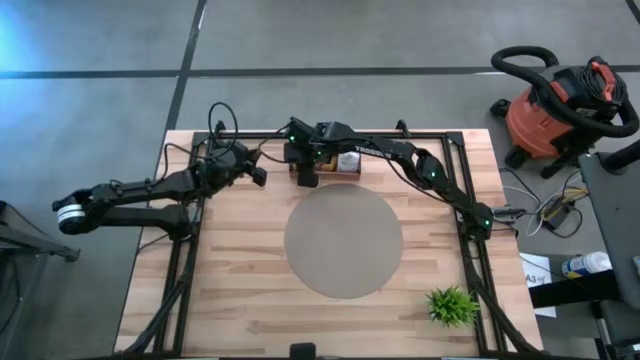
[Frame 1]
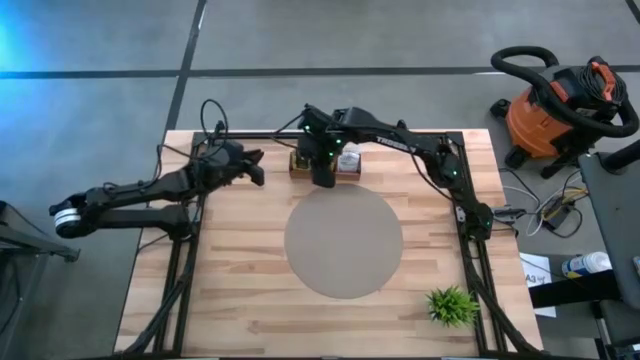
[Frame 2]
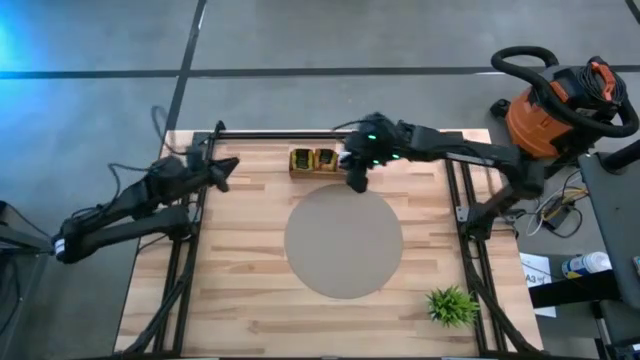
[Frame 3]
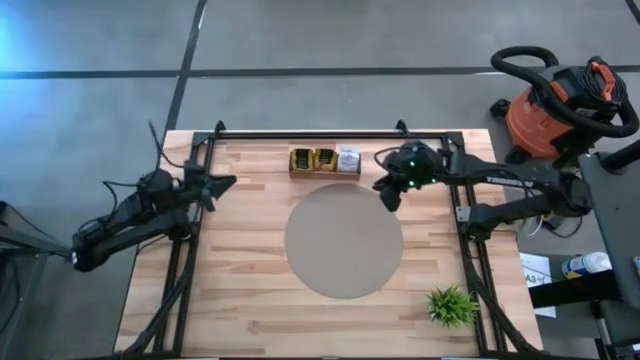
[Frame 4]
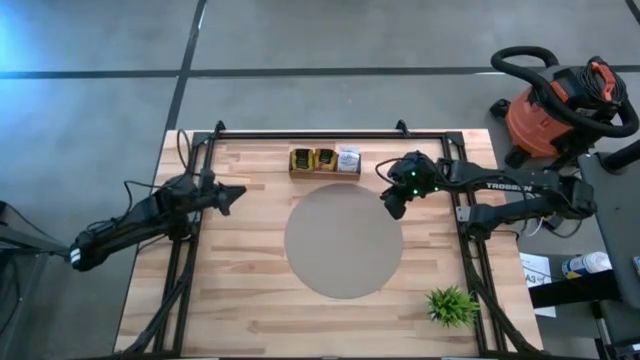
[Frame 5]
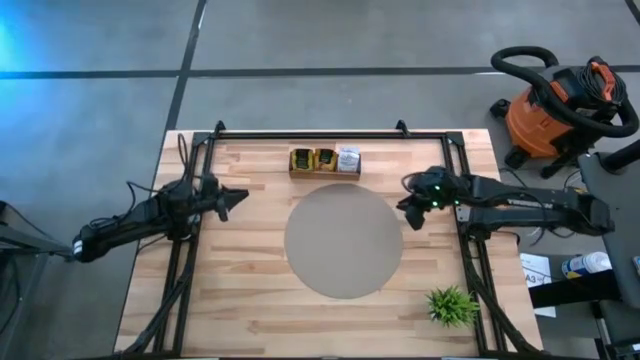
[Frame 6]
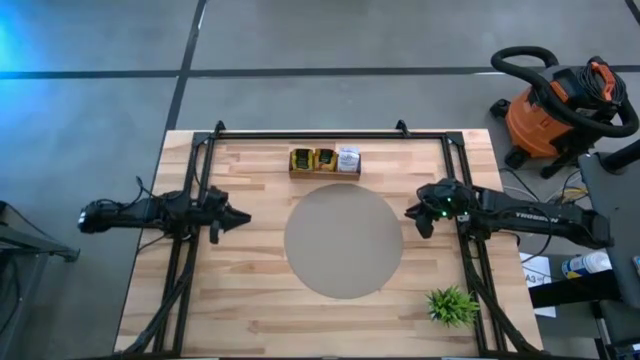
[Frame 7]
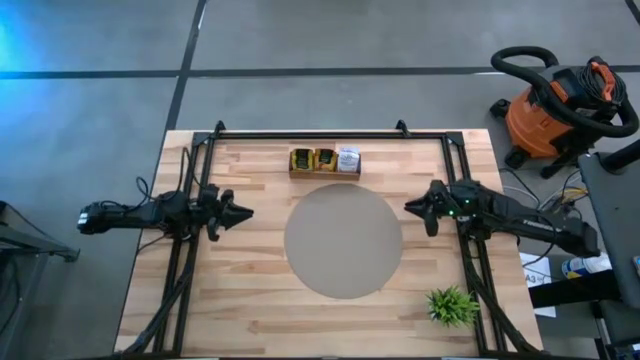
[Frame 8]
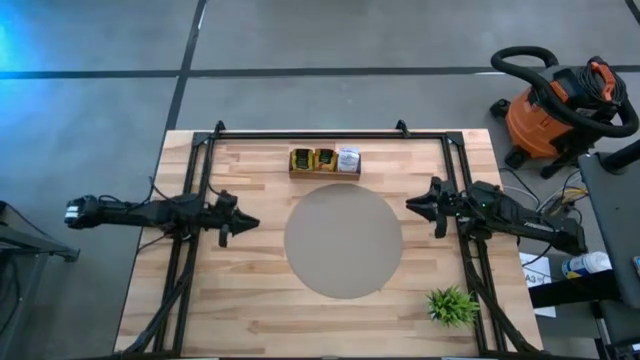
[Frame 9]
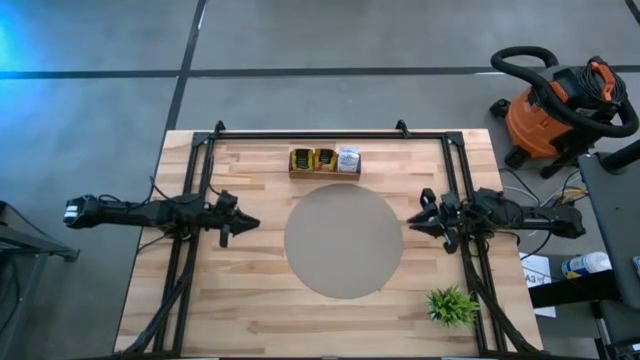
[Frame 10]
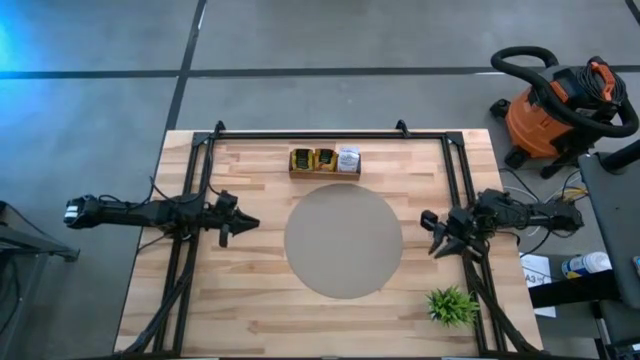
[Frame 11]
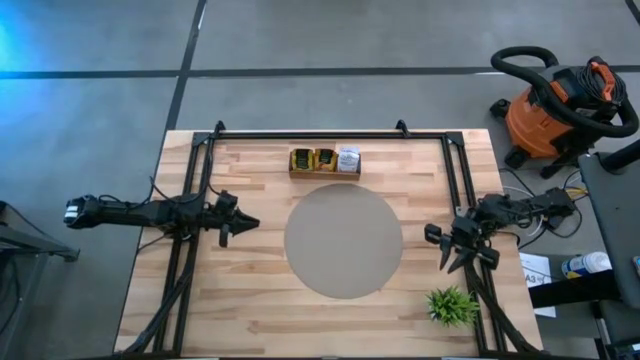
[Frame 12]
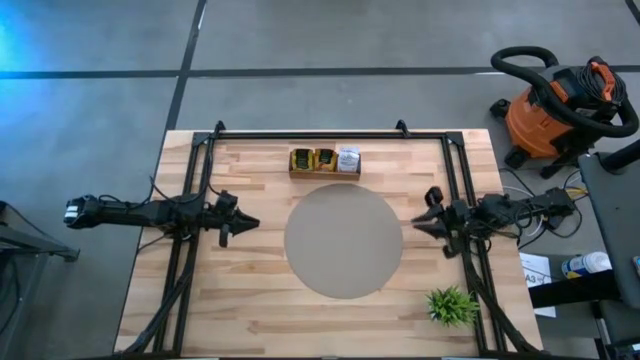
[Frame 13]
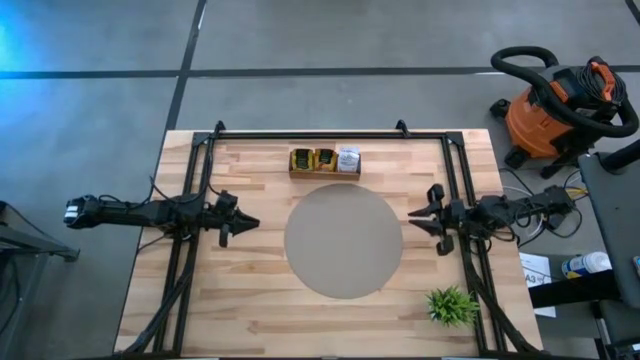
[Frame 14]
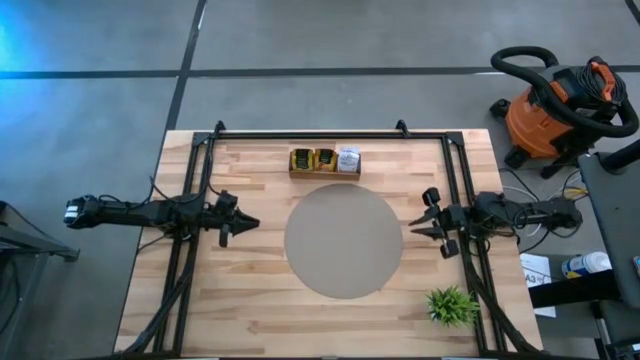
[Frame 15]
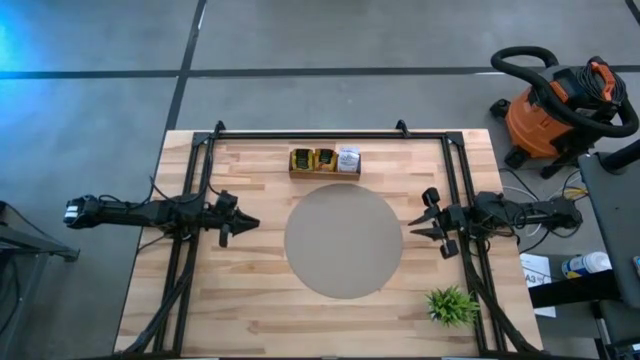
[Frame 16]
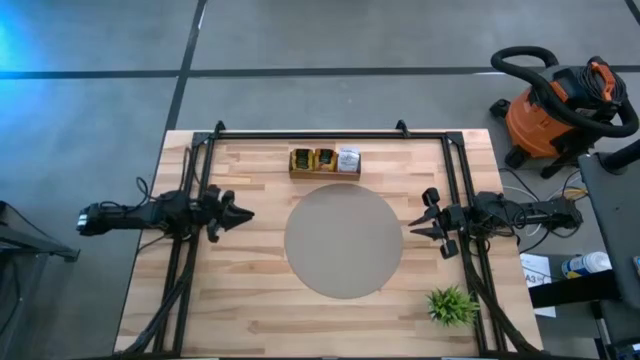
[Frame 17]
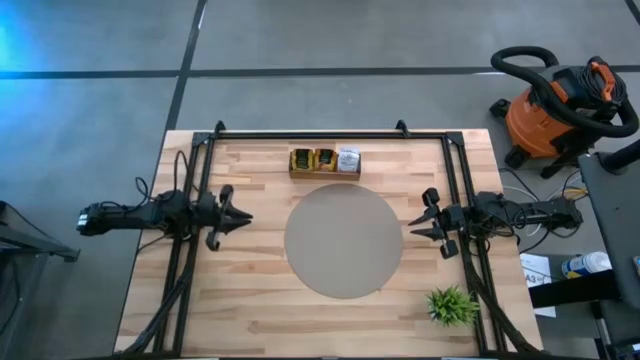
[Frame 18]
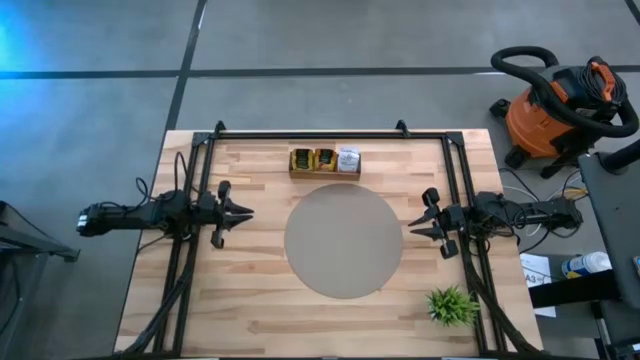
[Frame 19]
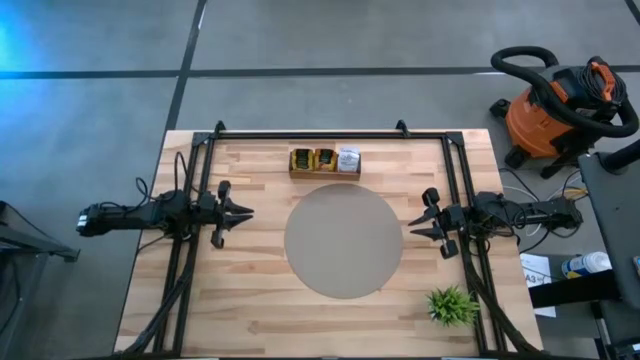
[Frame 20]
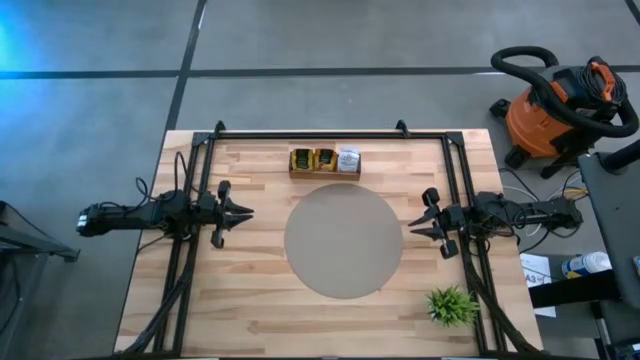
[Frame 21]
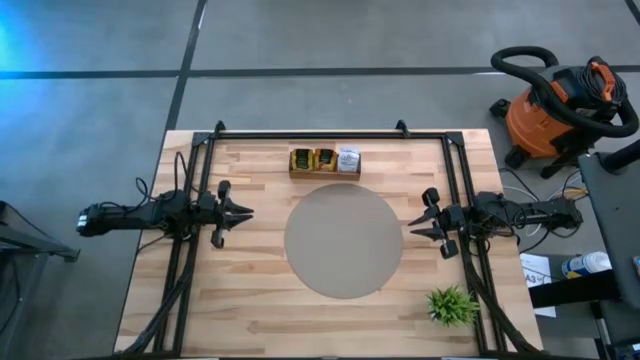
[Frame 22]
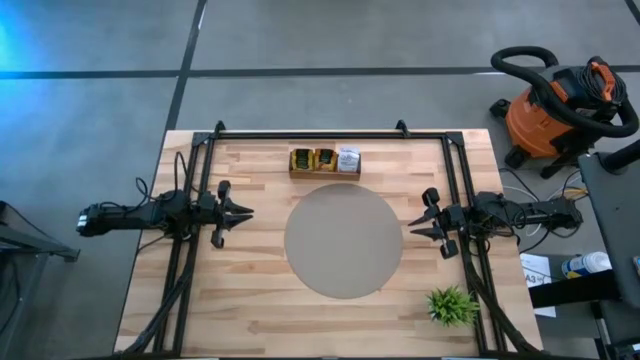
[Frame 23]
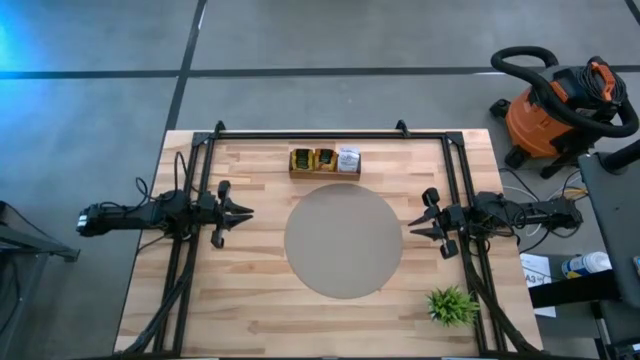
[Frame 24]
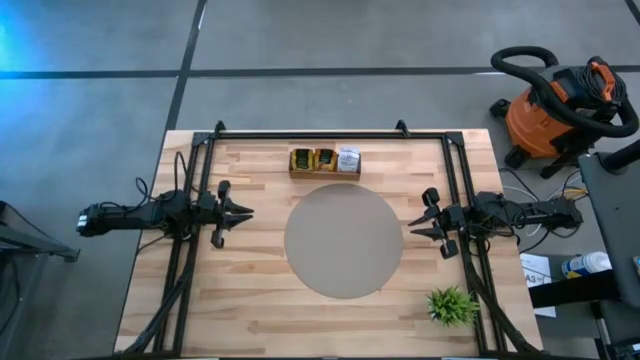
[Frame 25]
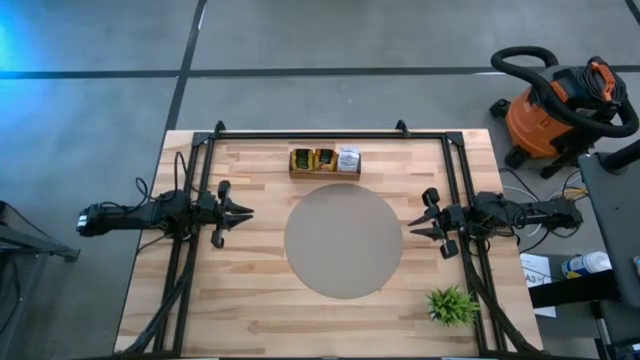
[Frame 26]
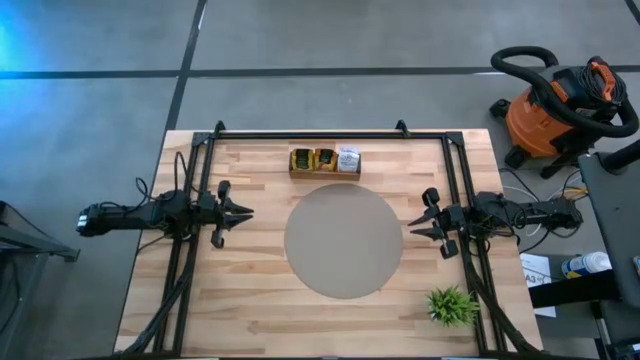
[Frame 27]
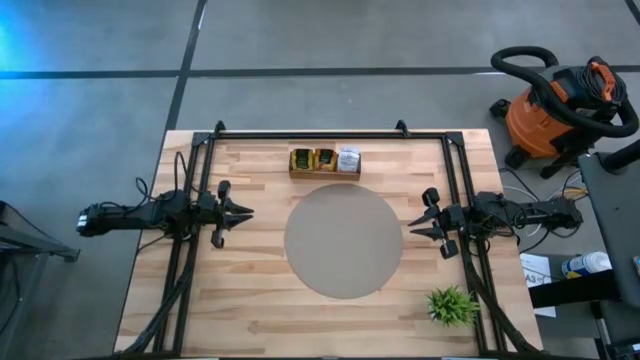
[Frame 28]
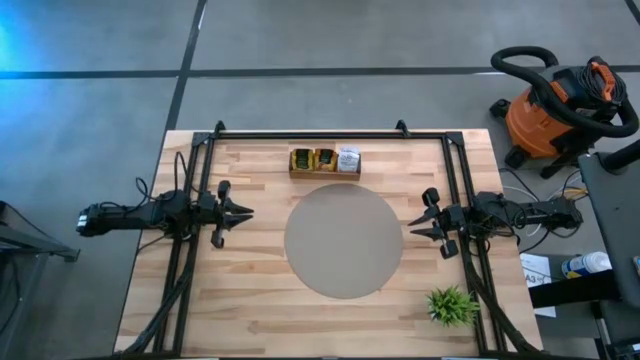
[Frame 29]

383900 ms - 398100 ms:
Task: Pick & Place Tea
Return to Home Position

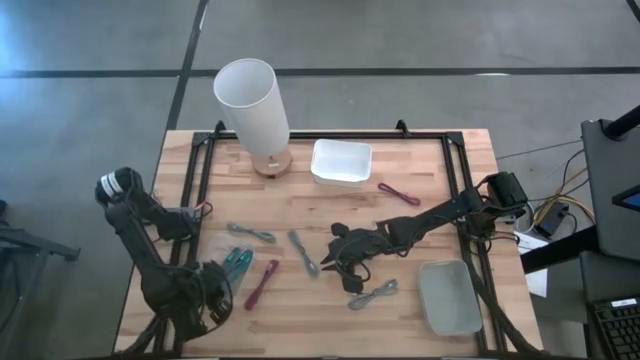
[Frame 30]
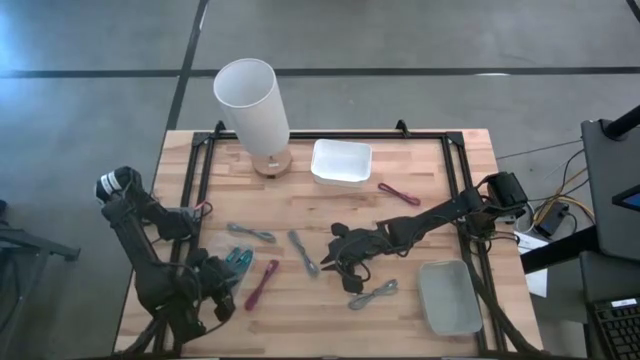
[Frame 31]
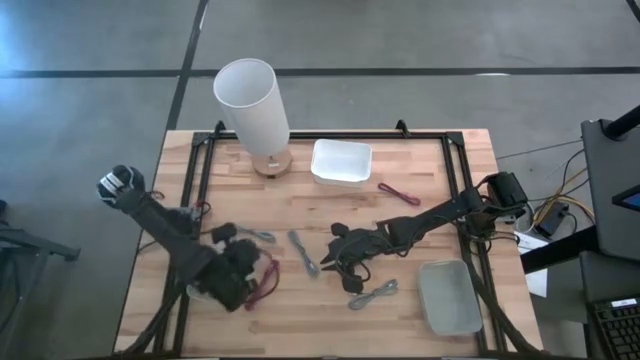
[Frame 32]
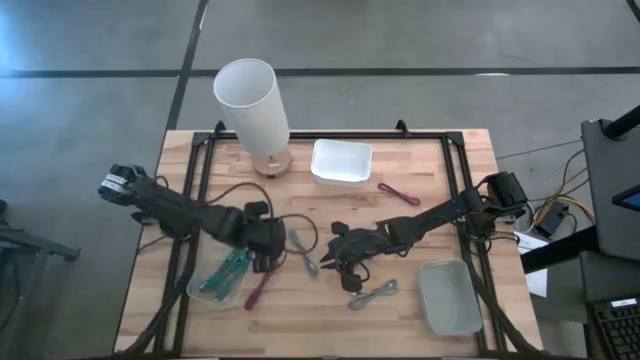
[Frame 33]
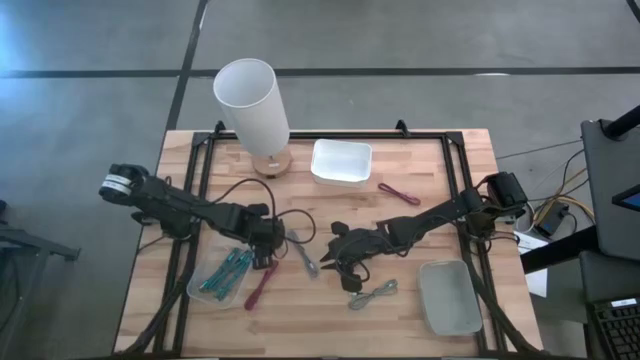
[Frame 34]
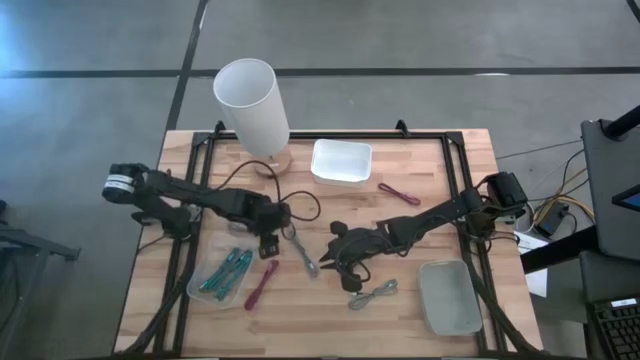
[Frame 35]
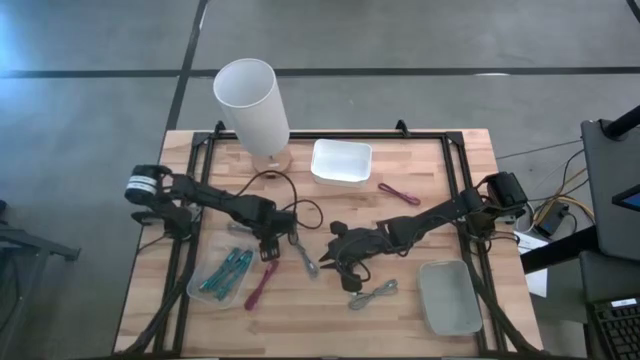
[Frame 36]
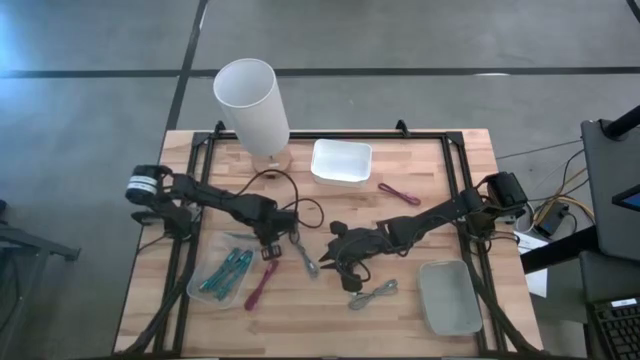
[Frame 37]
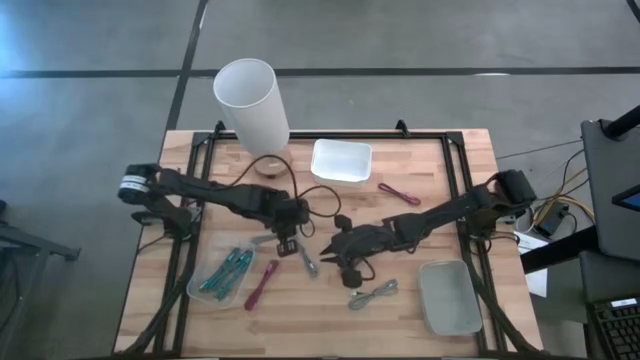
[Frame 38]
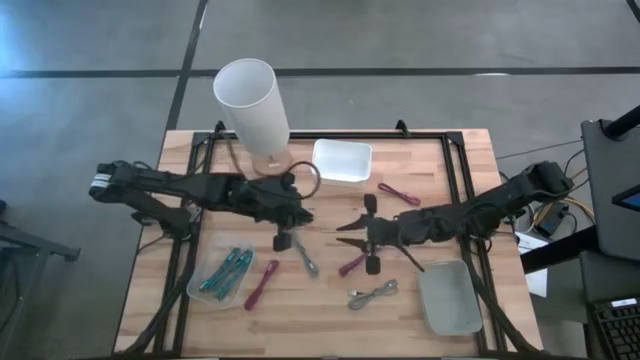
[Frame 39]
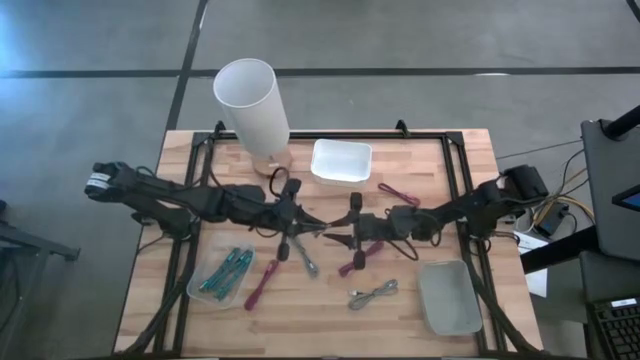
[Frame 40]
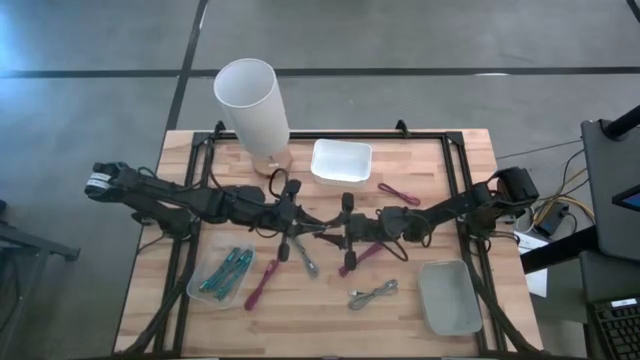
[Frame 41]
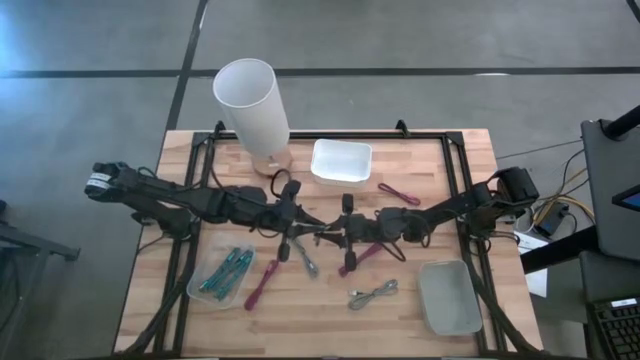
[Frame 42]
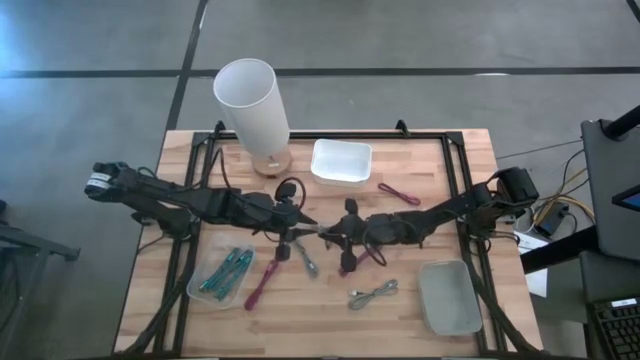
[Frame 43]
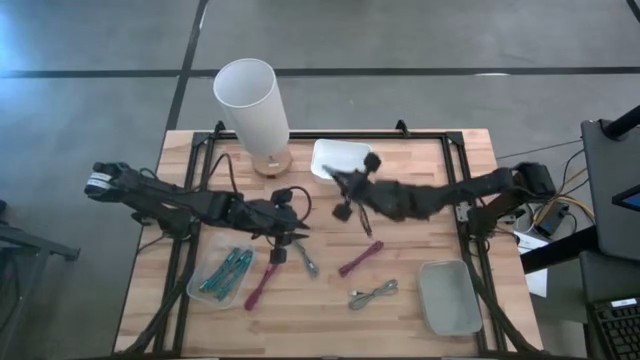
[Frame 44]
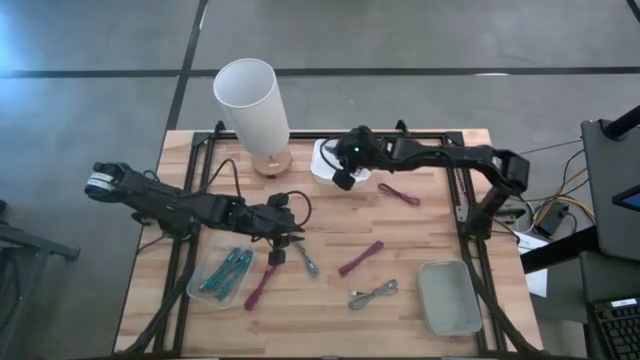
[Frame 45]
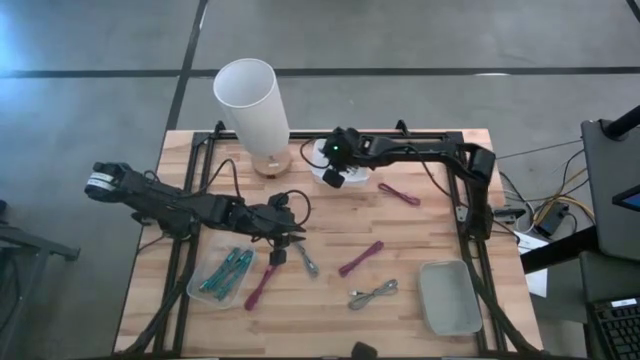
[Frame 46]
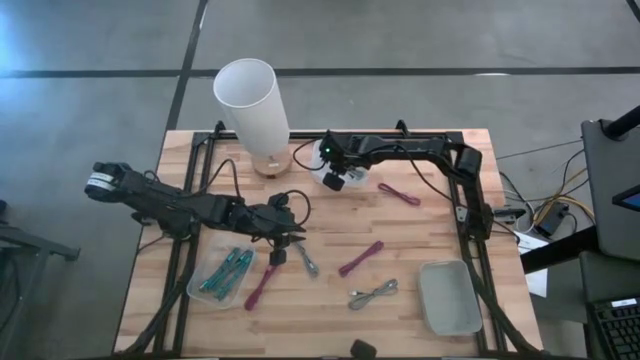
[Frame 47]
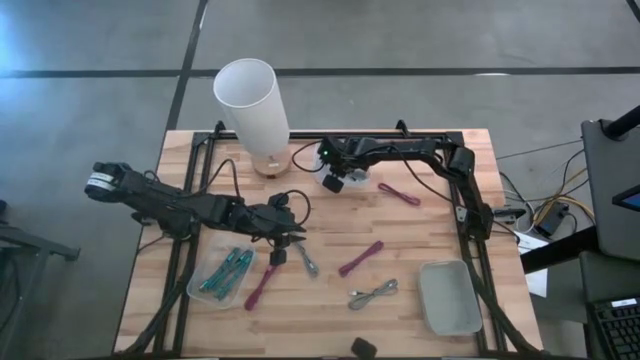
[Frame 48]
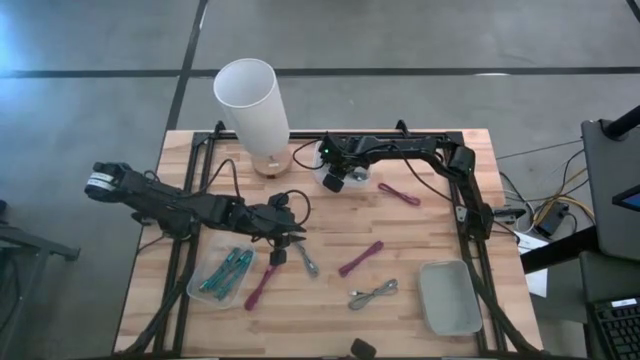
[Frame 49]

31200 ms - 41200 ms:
Task: Pick & Place USB Port
Put the top left white black charger cable into the white bin
